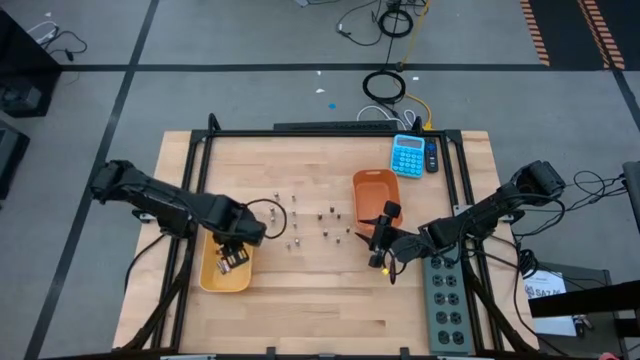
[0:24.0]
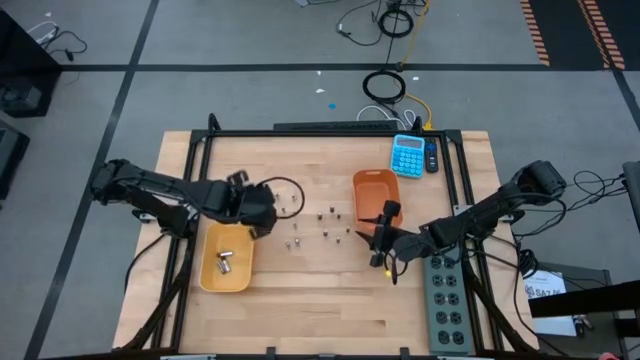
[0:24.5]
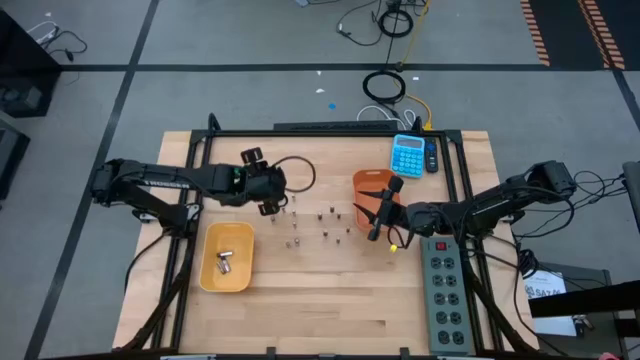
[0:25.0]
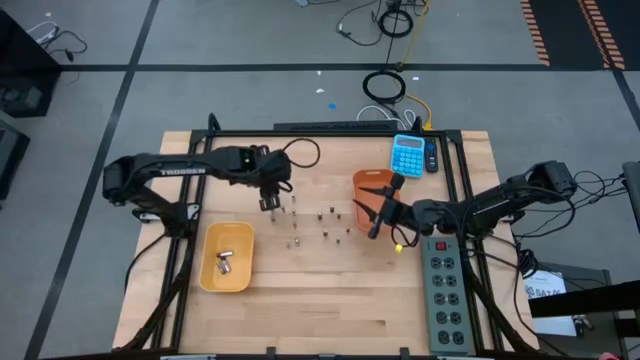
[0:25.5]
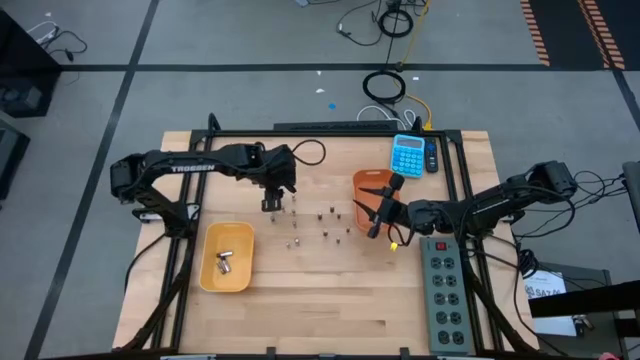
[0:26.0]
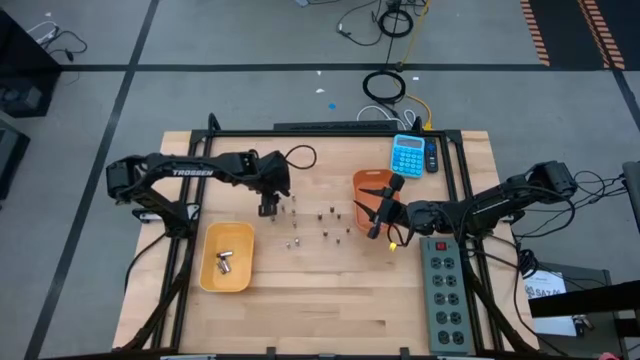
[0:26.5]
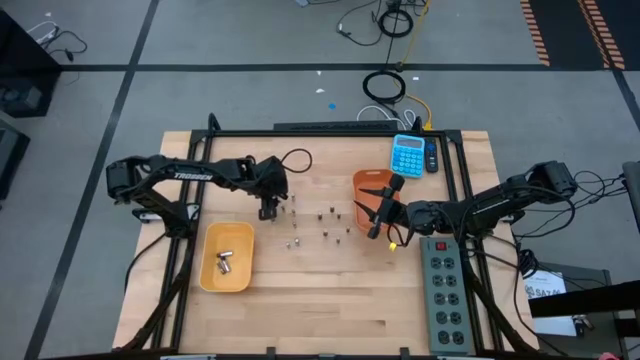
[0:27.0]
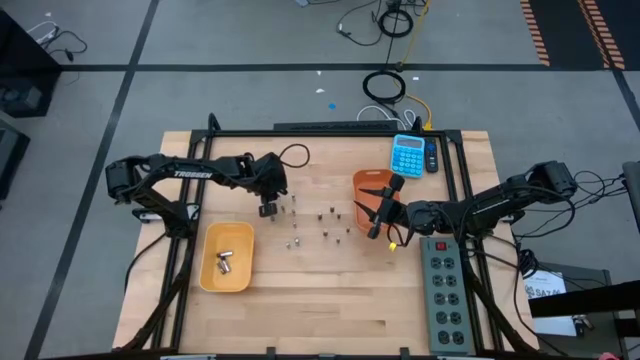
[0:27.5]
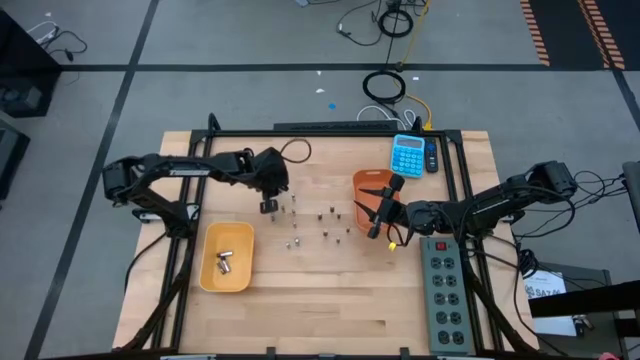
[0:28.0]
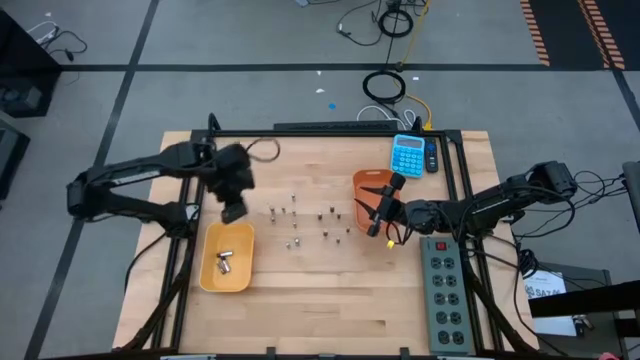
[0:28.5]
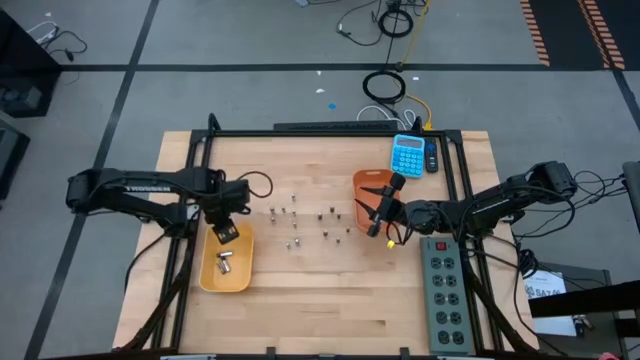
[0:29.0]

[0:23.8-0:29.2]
Task: Sort batteries
Put the silver black battery into the yellow bin

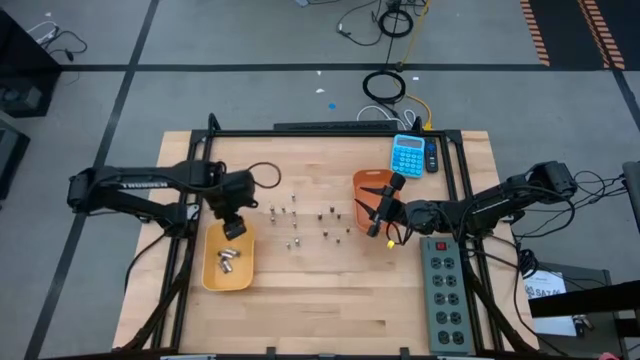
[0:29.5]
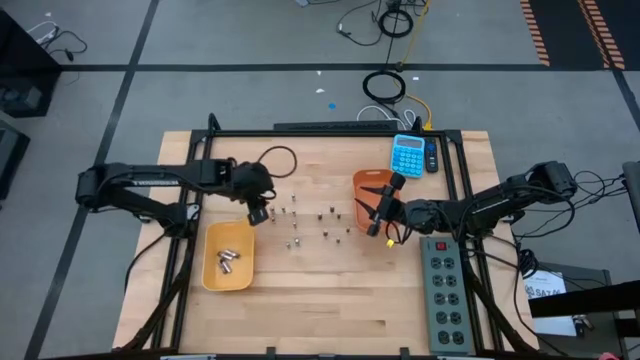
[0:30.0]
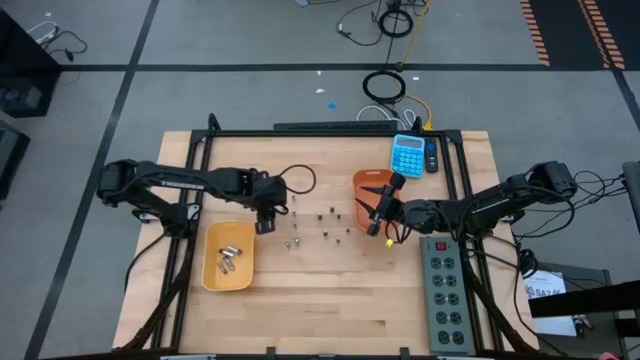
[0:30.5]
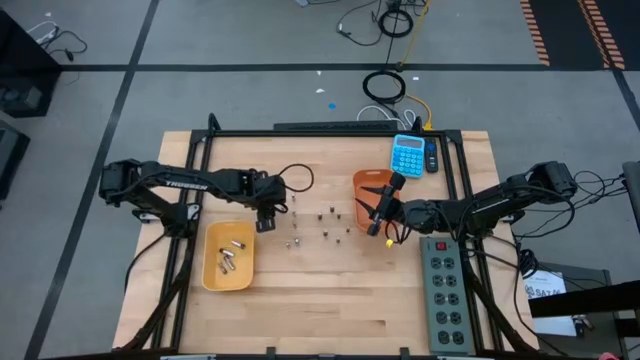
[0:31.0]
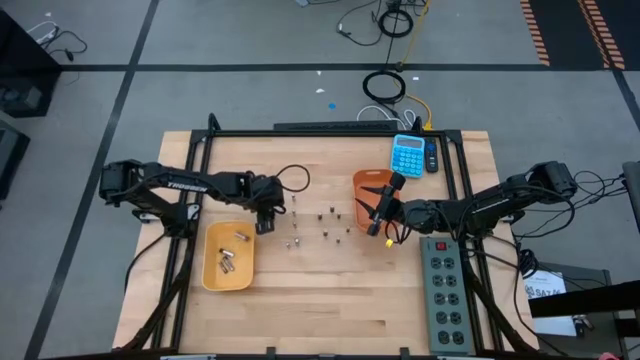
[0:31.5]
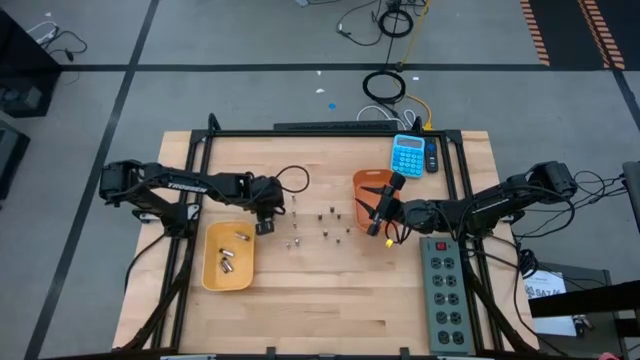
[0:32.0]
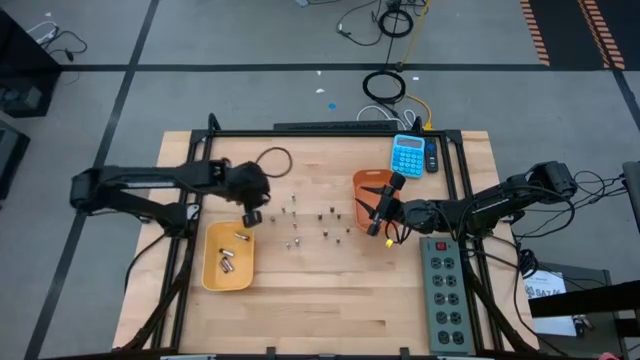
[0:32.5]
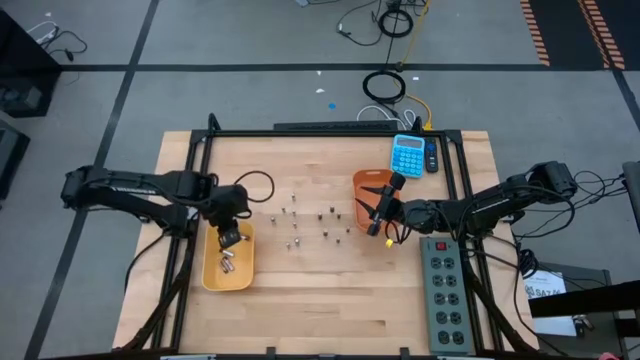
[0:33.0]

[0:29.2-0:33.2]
Put the silver black battery into the yellow bin

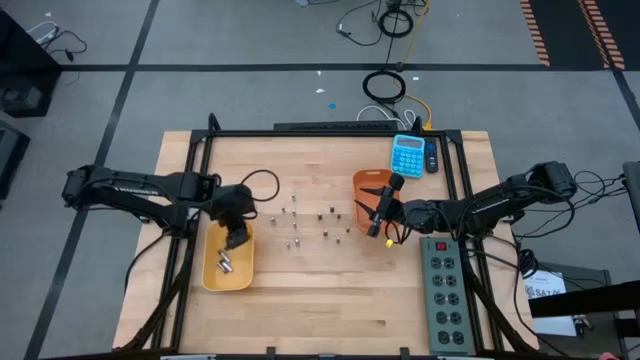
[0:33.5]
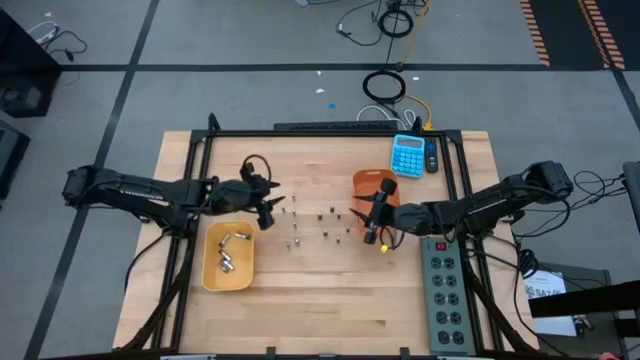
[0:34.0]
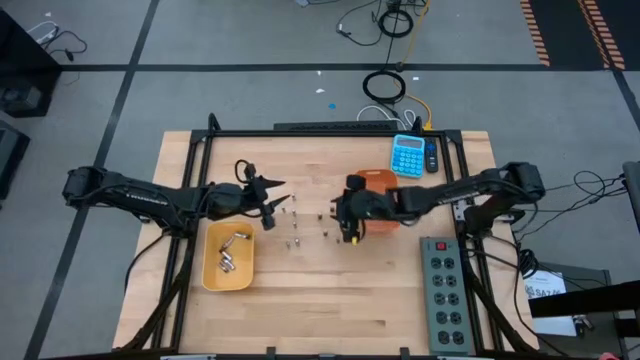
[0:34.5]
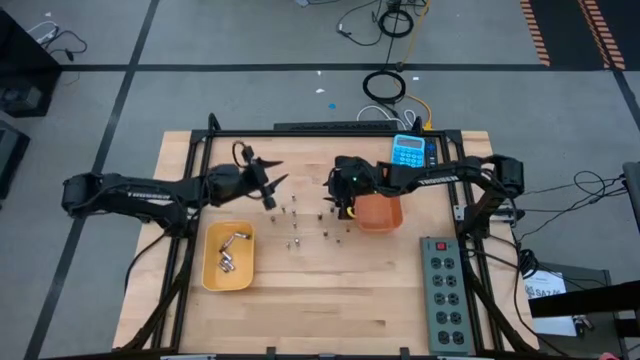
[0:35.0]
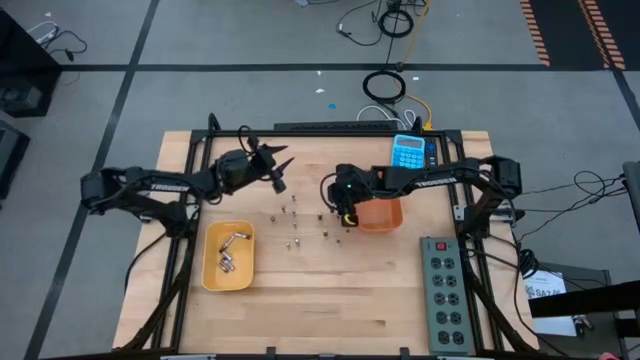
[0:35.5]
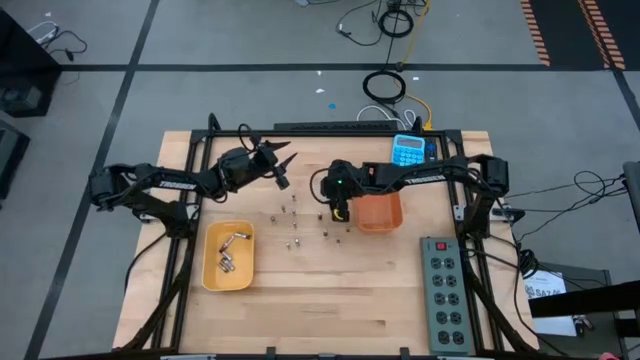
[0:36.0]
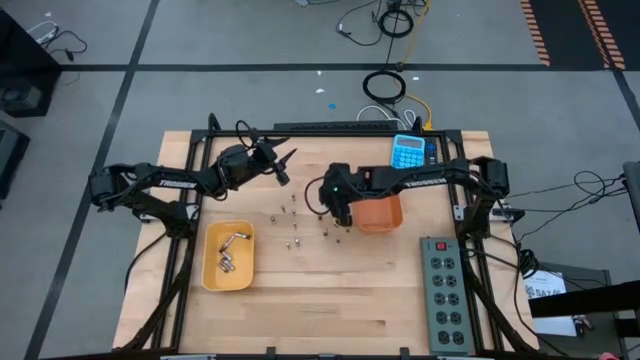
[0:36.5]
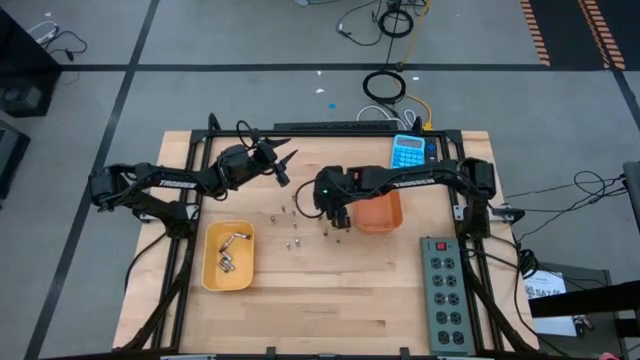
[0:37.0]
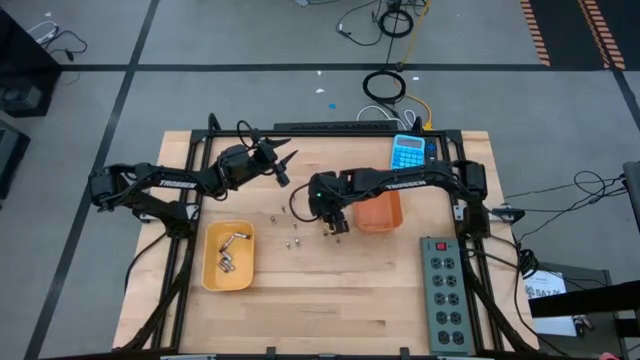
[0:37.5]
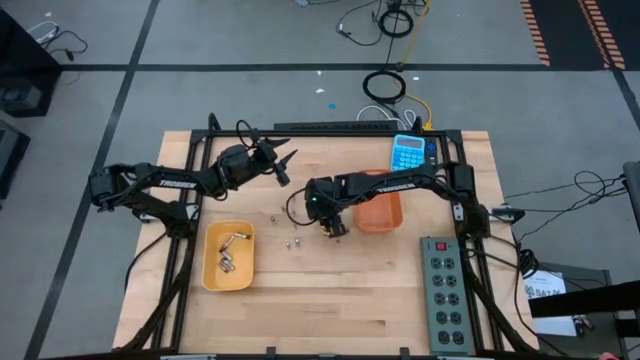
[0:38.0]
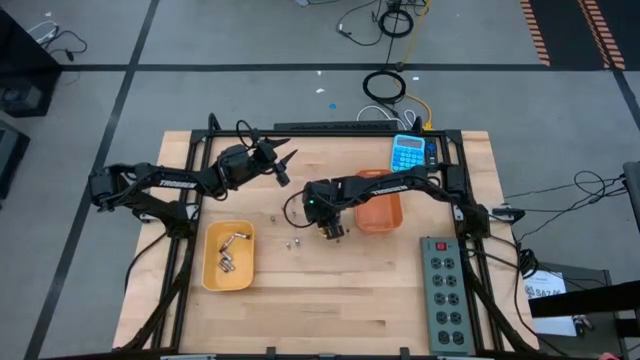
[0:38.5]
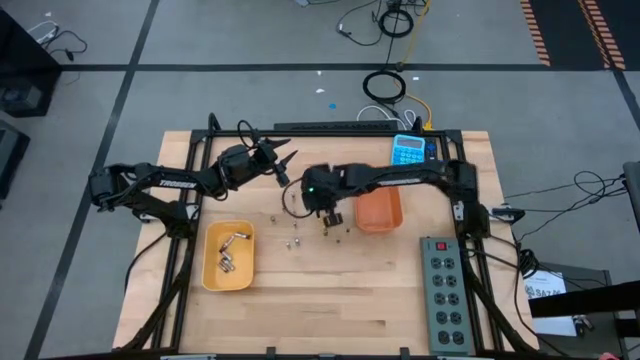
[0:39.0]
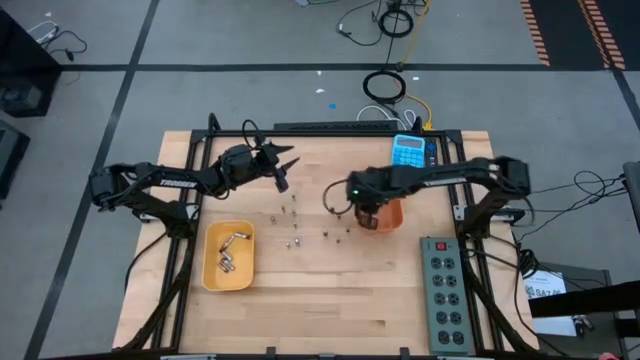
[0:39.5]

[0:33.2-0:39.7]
Put the black brown battery into the orange bin

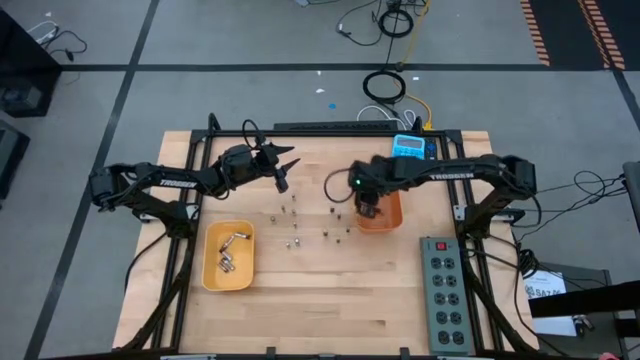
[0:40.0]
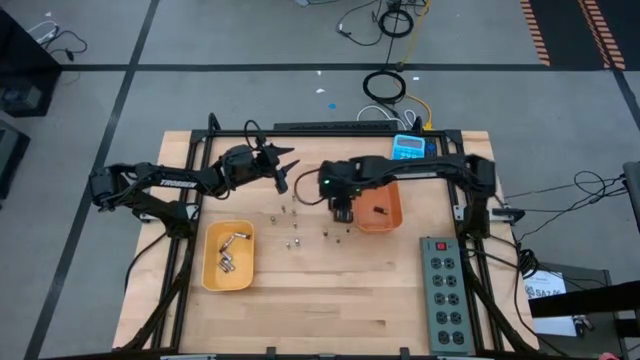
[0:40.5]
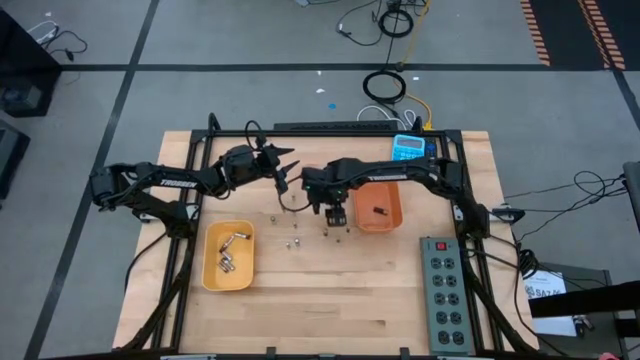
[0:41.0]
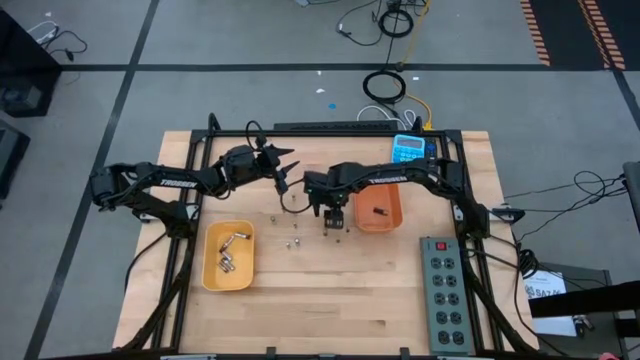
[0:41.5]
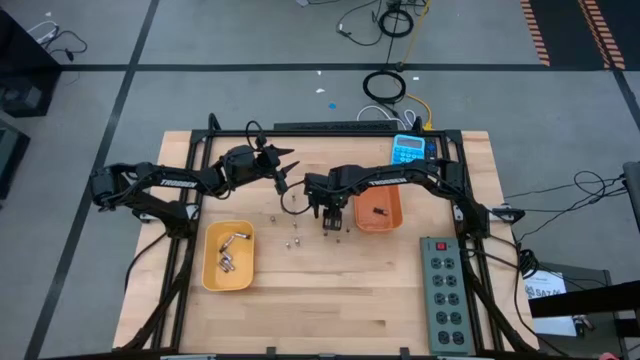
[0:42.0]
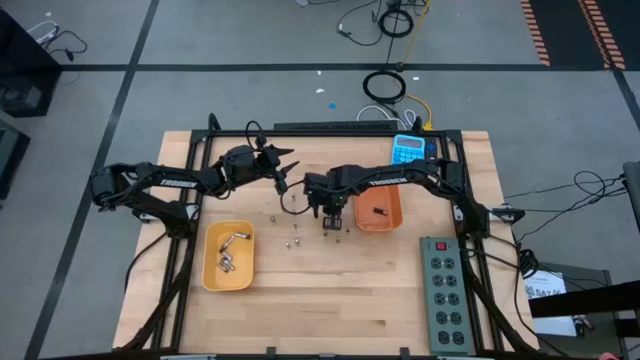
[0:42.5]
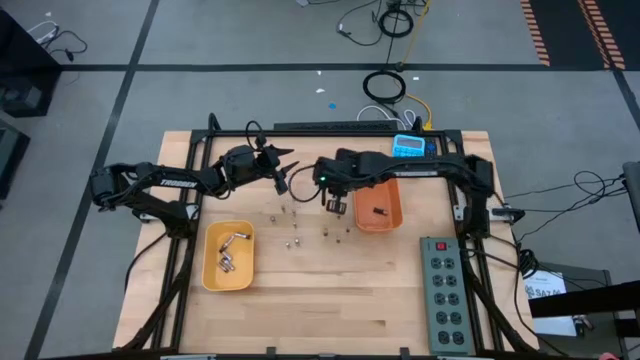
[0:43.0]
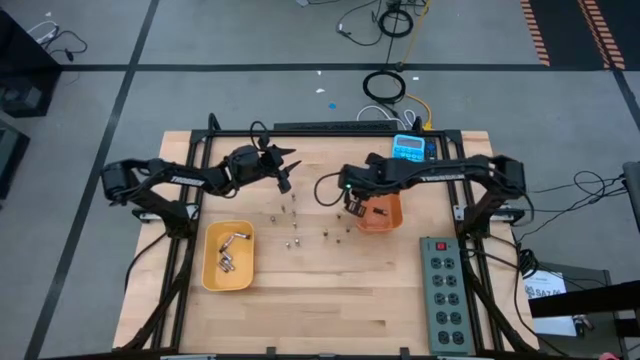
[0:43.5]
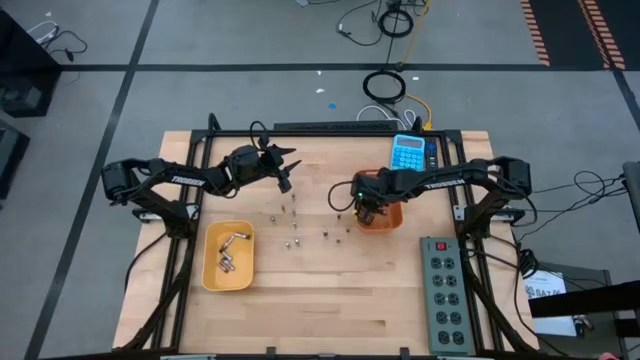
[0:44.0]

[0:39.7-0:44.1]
Put the black brown battery into the orange bin

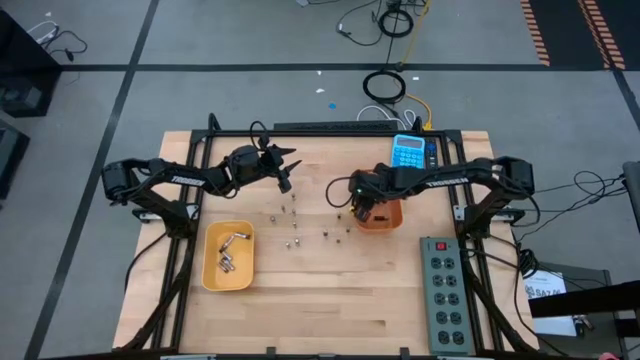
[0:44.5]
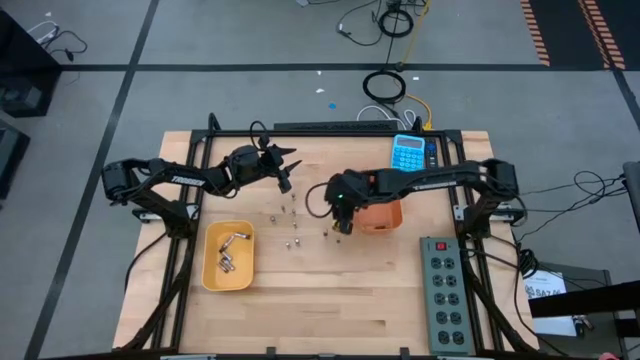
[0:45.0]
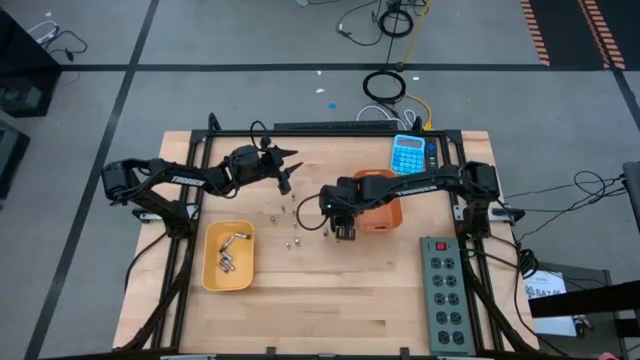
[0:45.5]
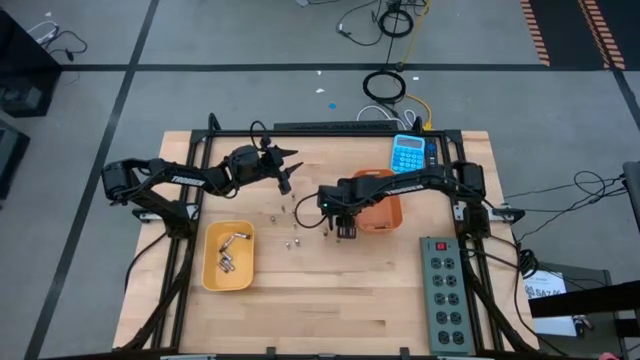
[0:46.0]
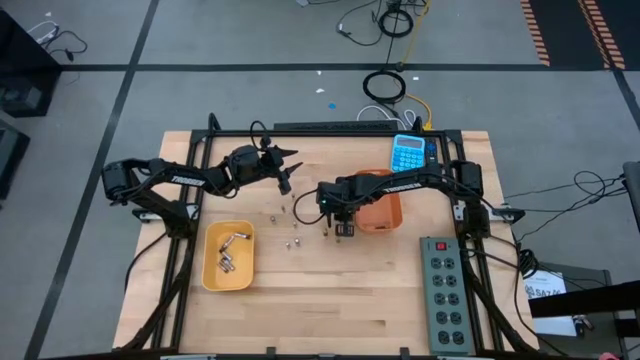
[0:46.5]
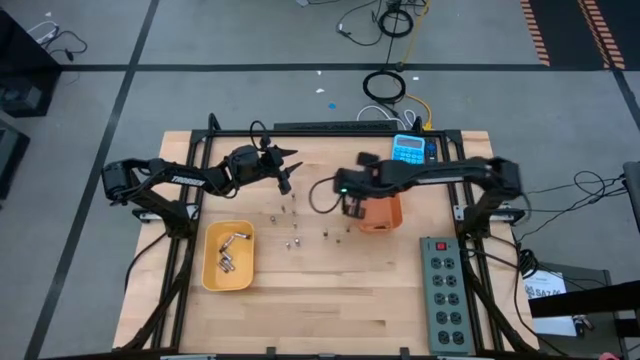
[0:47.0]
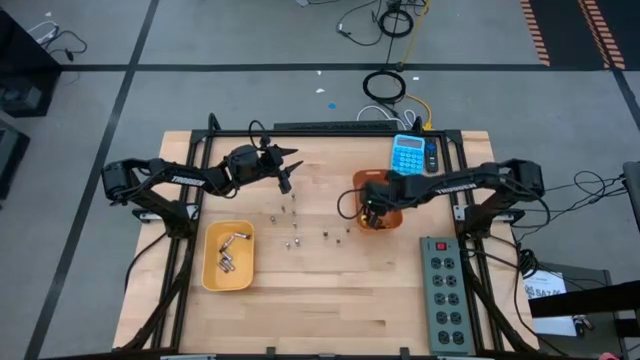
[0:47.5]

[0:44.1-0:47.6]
Put the black brown battery into the orange bin
